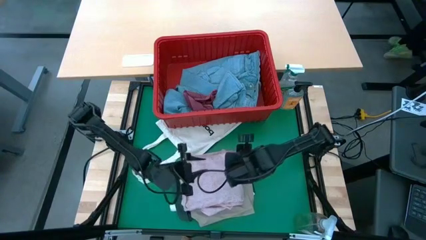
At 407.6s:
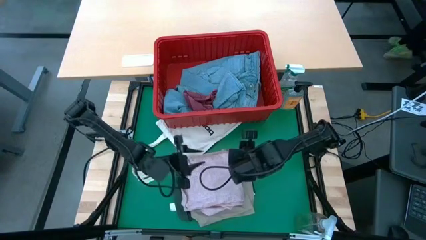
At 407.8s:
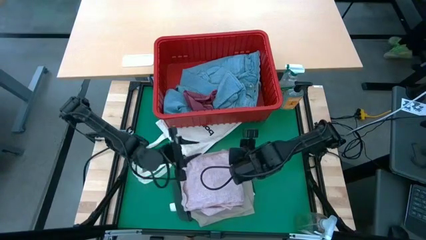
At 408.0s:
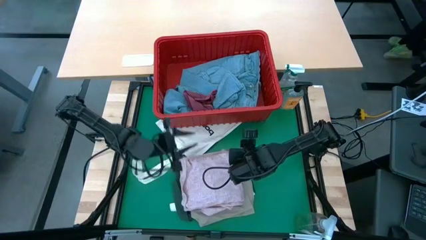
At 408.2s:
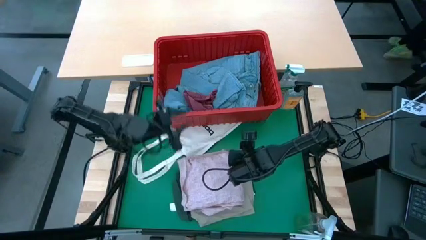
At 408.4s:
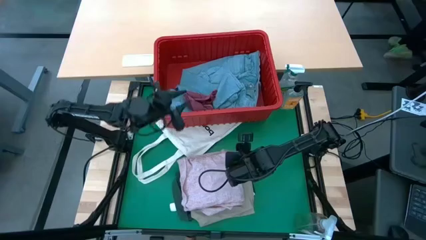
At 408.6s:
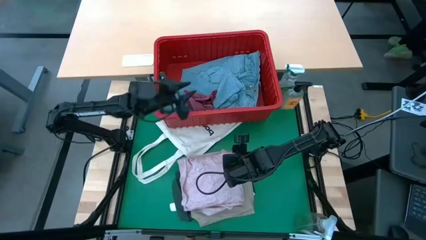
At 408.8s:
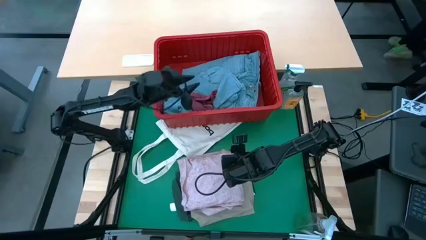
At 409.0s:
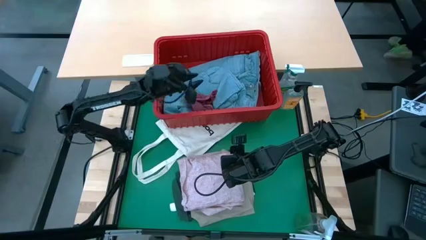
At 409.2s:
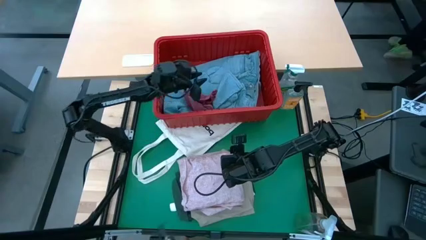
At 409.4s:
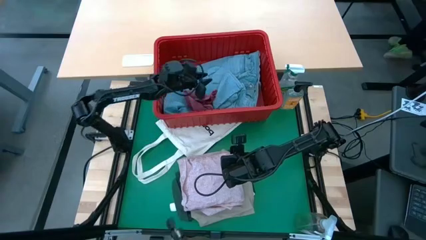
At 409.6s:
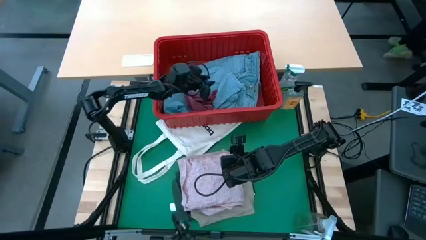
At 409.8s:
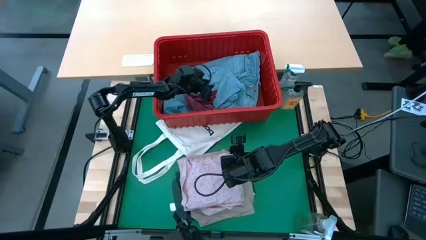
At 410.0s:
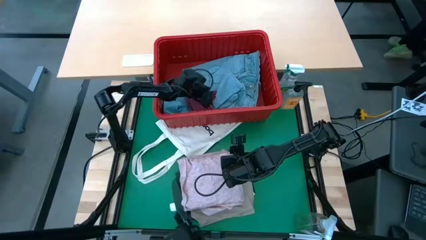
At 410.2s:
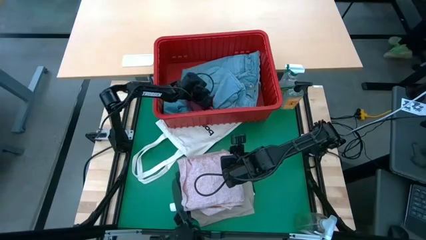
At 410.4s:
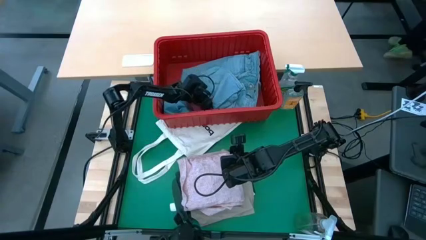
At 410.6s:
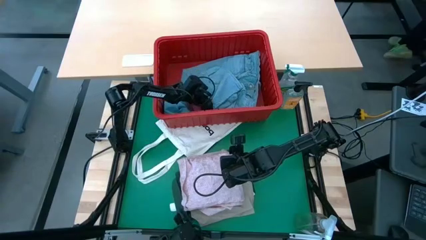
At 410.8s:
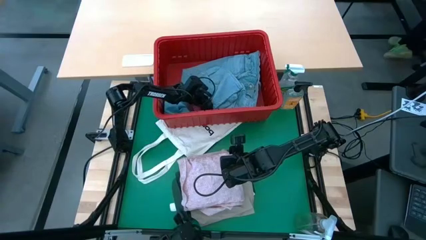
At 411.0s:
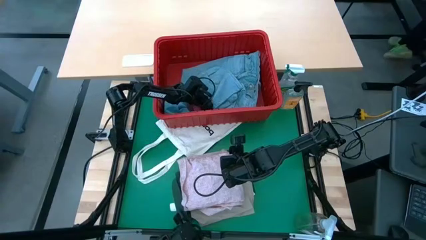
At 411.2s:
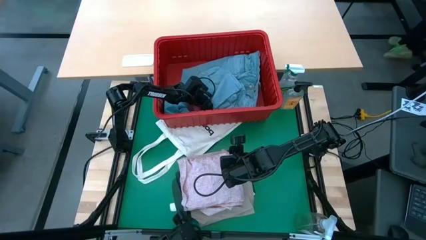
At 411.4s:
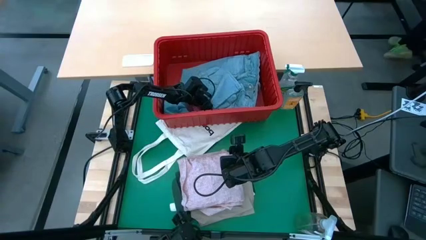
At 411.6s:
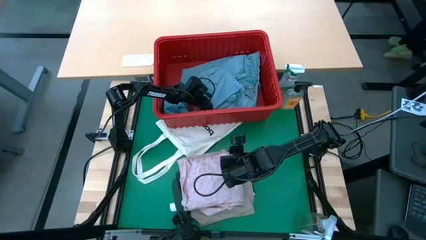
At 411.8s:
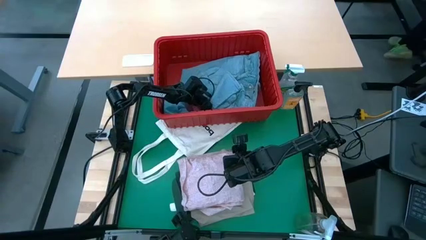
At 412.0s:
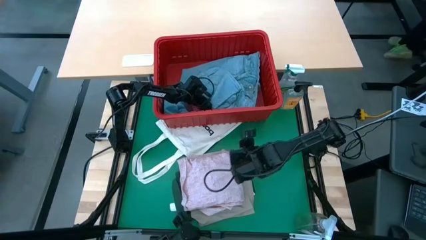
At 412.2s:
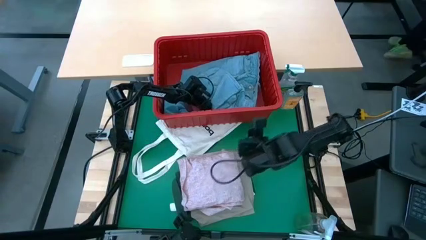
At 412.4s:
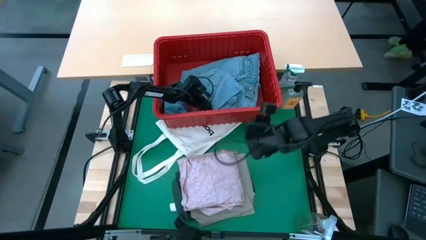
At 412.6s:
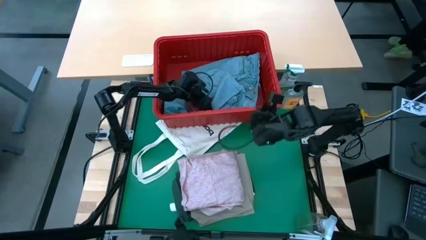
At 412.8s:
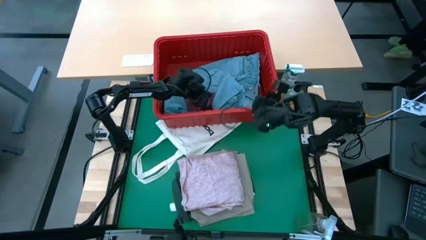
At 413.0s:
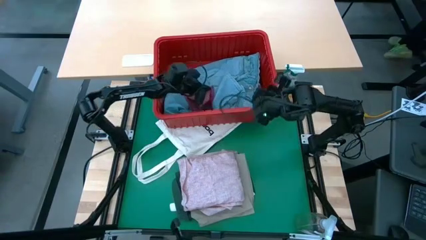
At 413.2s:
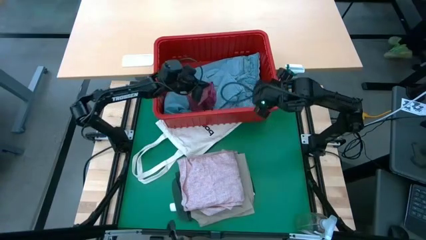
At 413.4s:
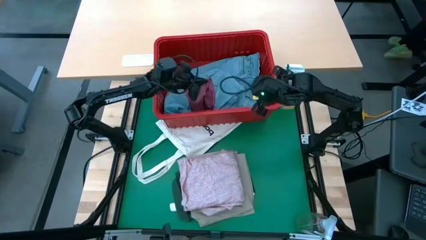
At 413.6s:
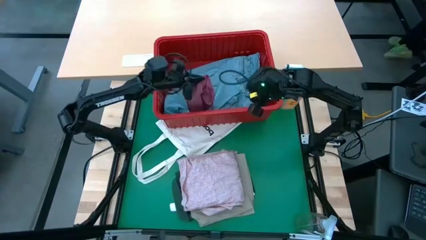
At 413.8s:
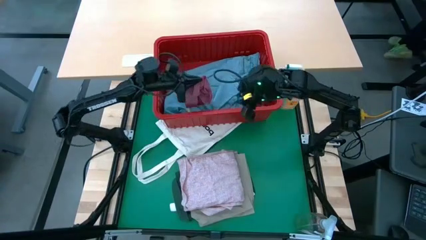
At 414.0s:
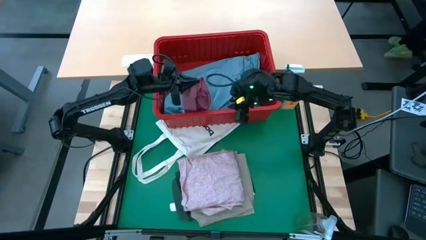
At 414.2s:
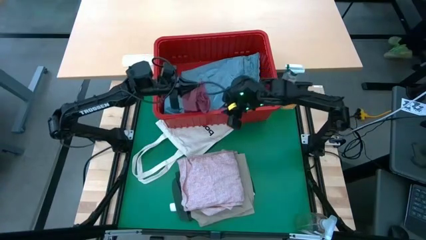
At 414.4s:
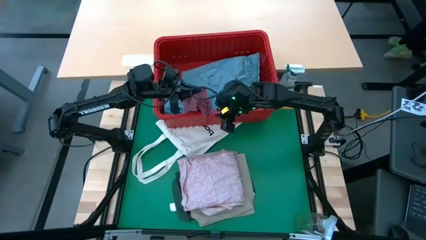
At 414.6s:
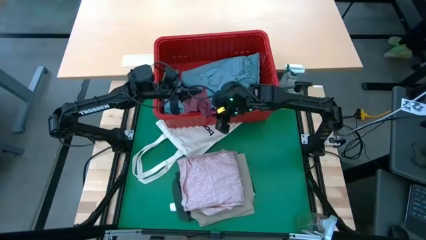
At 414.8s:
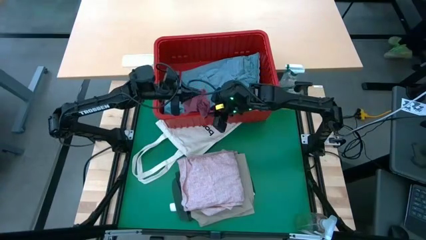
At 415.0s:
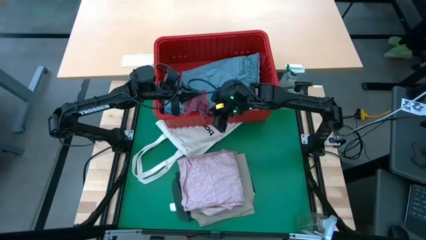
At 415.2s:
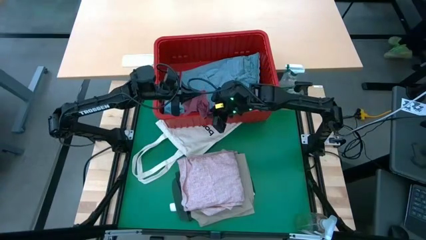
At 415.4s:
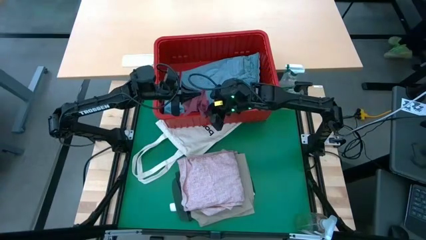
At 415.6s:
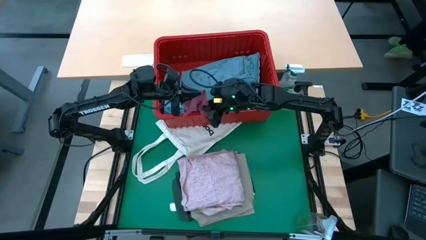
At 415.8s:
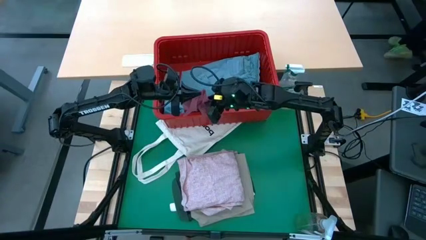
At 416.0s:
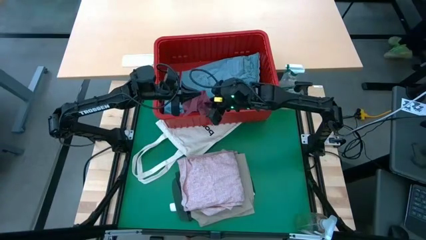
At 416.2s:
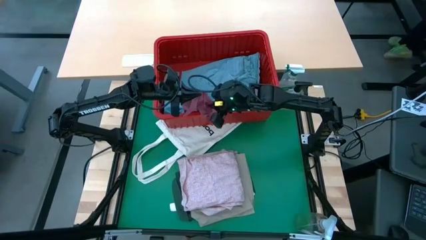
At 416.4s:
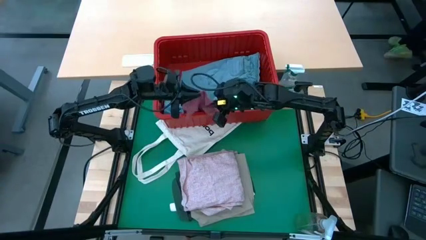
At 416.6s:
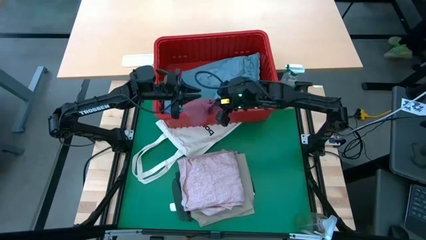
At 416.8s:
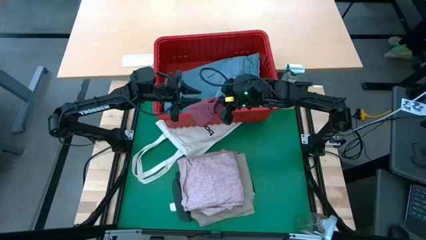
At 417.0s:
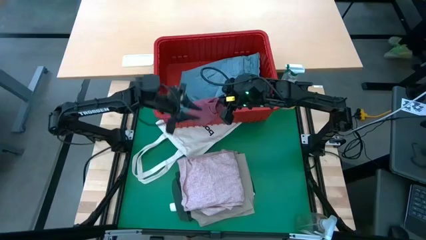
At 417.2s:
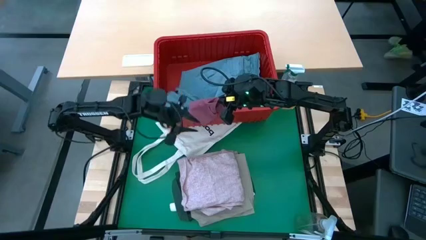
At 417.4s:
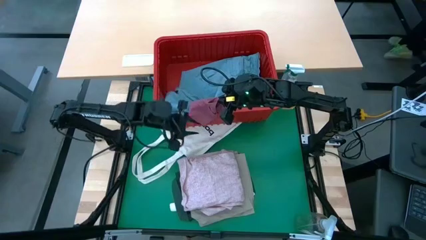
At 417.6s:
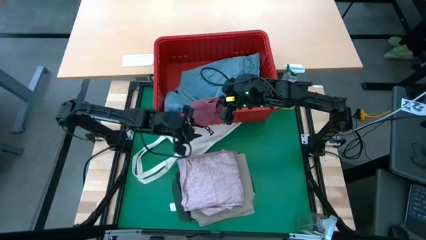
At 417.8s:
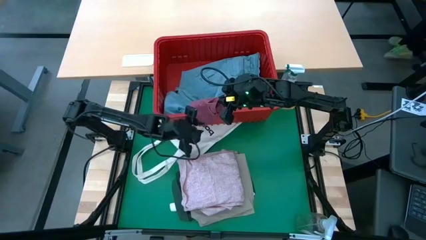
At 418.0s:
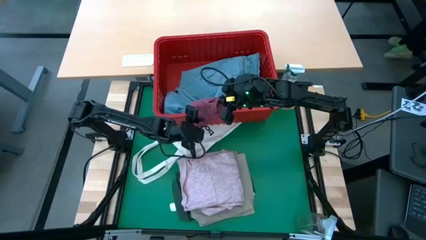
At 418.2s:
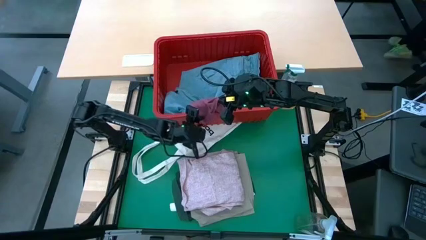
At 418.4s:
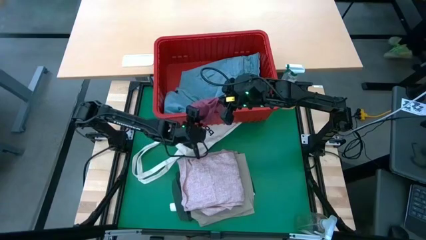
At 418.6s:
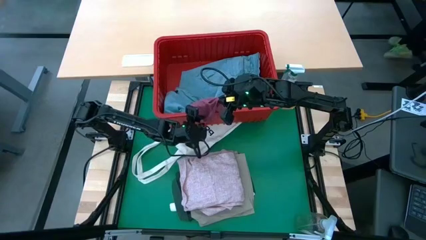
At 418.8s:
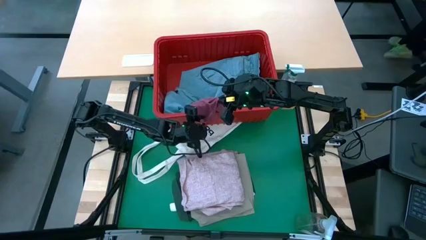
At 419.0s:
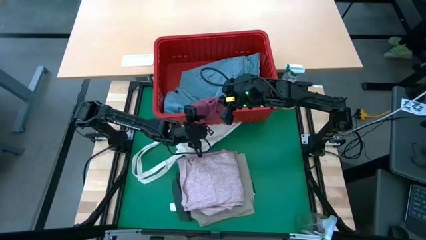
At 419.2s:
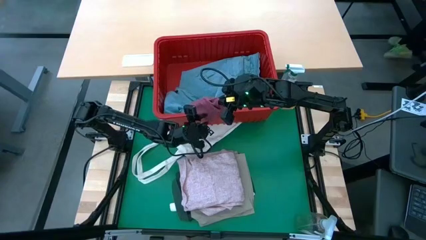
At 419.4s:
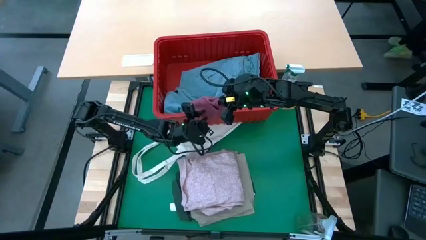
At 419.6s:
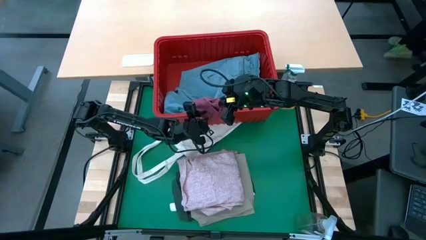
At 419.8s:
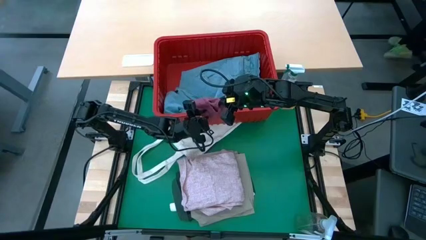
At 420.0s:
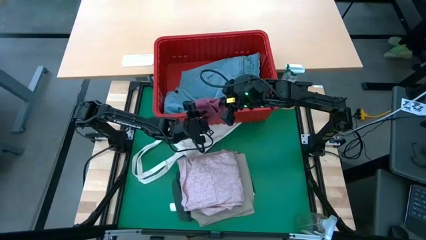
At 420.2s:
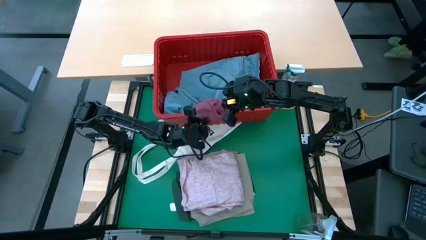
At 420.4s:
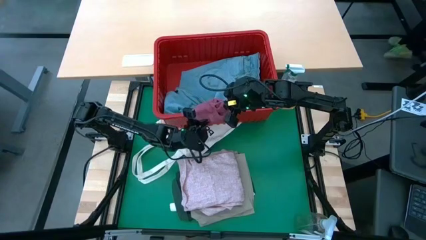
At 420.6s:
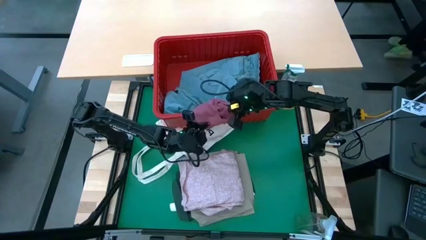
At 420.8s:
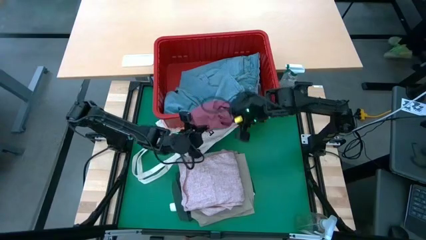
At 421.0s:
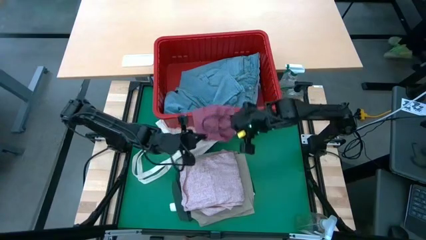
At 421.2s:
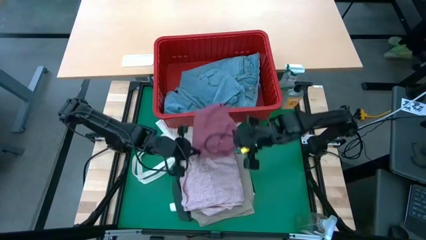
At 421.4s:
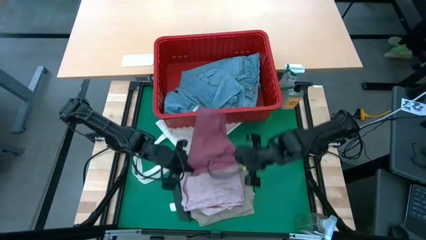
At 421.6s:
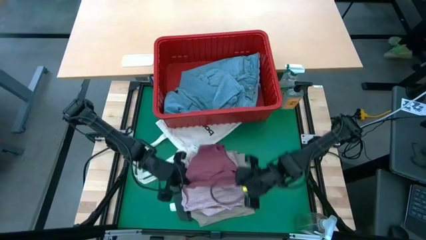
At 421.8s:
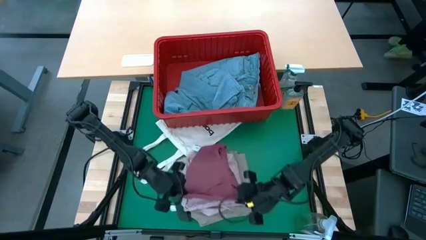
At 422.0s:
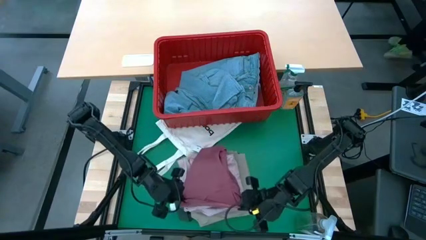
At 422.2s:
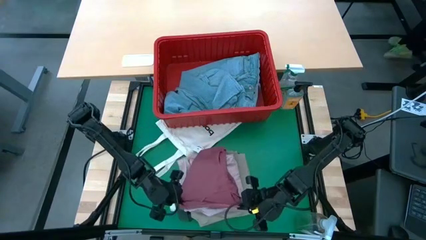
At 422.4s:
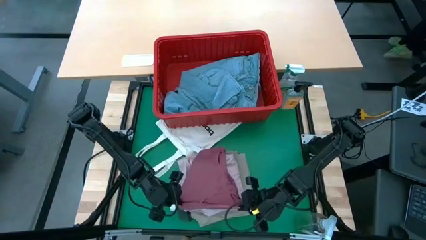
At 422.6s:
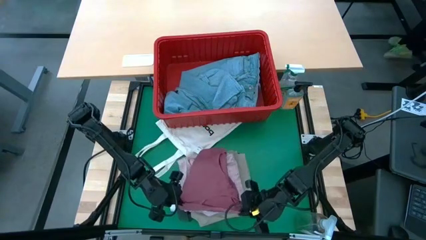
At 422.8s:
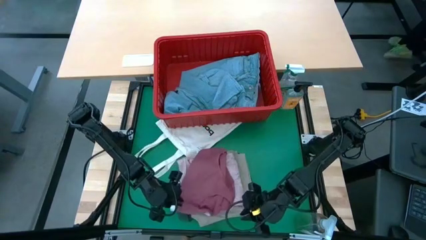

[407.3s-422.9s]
Task: Fold laundry
Fold the purple panty
